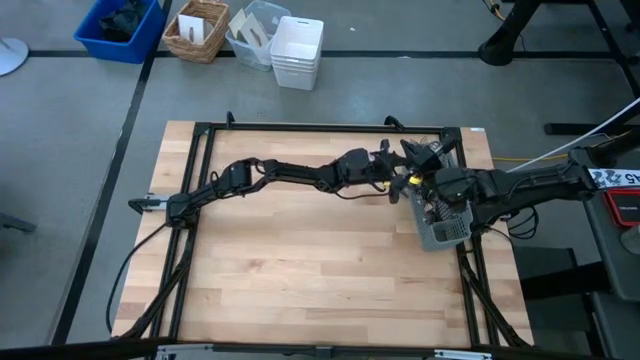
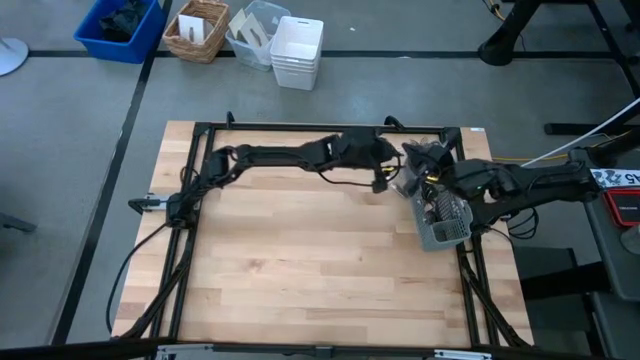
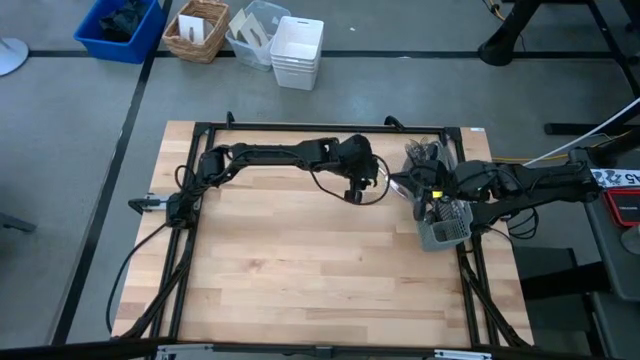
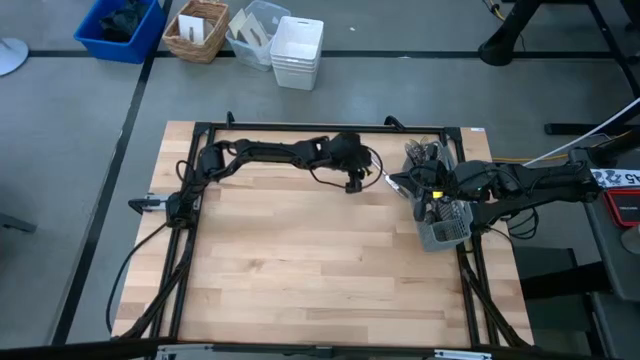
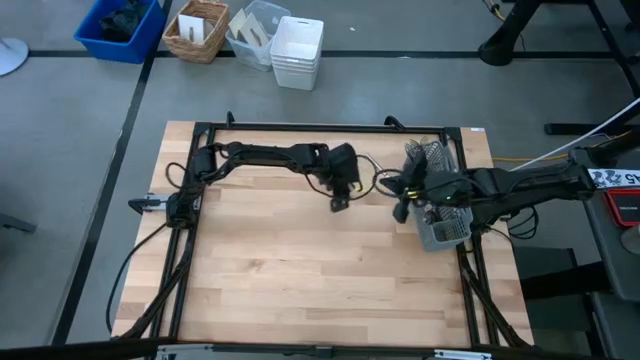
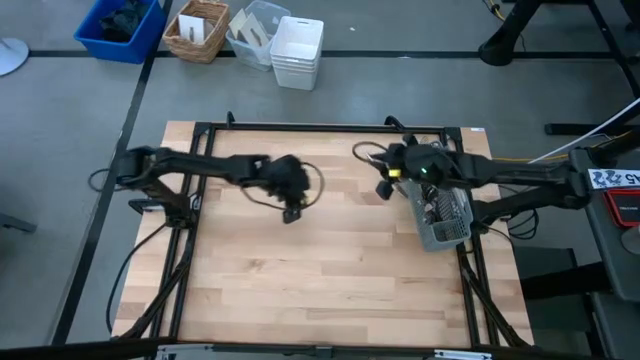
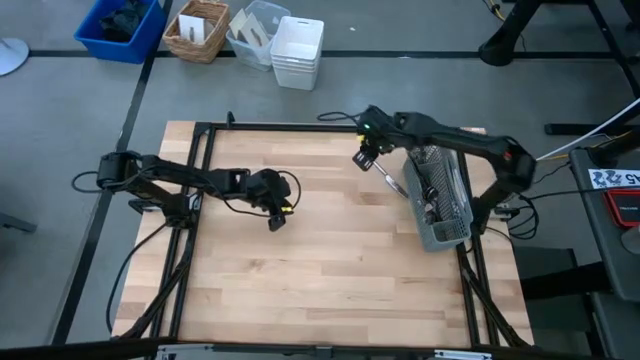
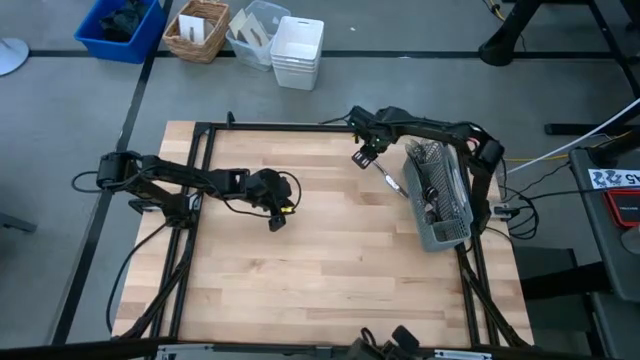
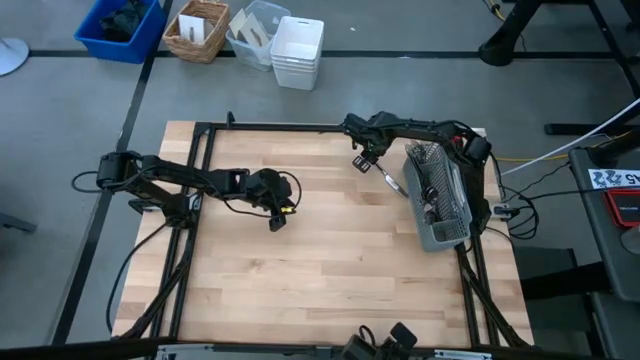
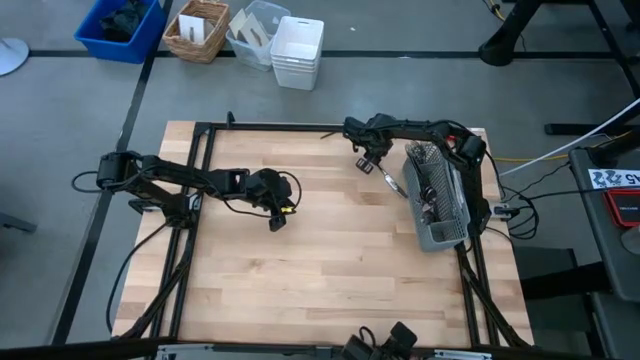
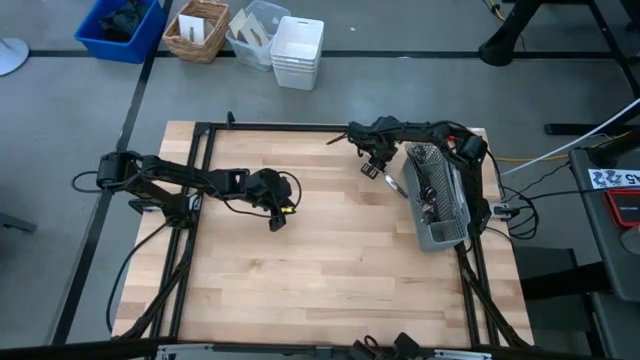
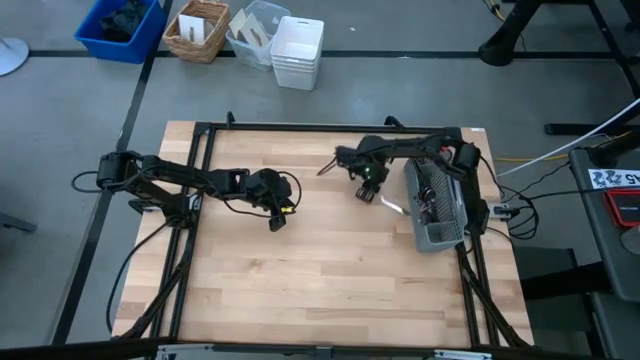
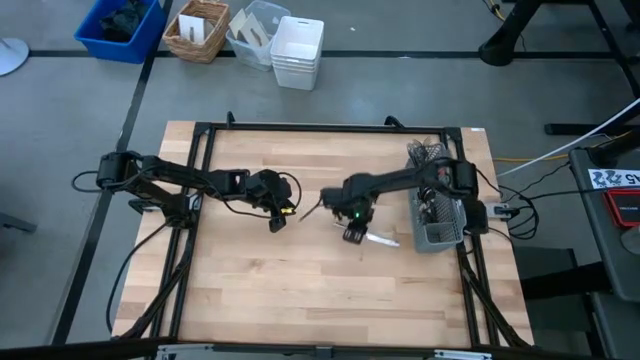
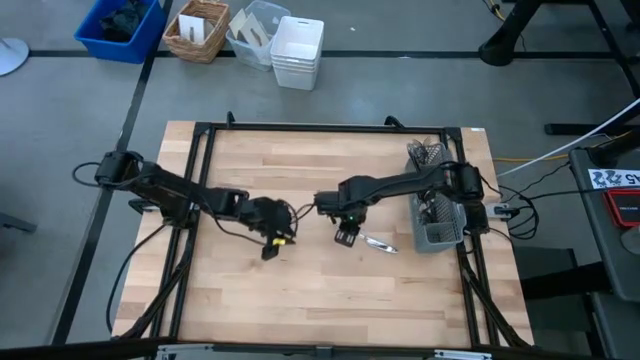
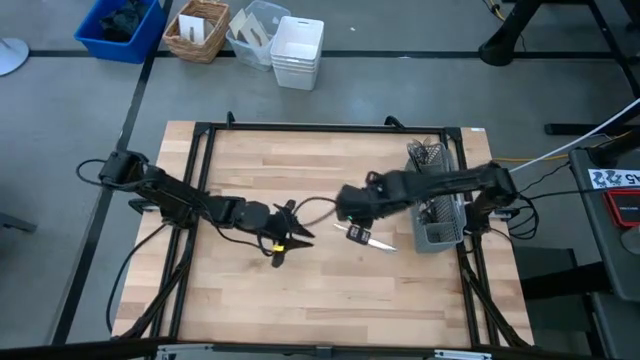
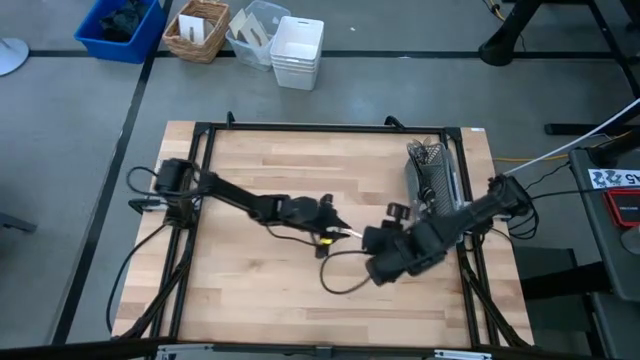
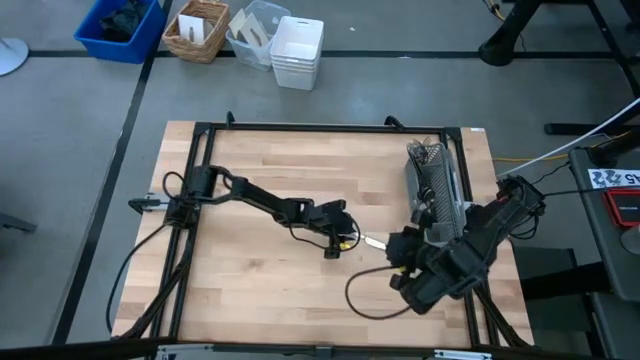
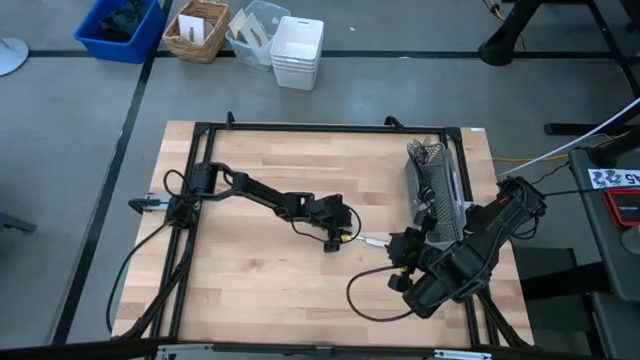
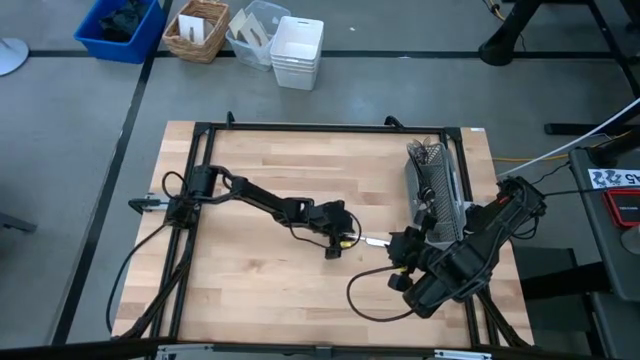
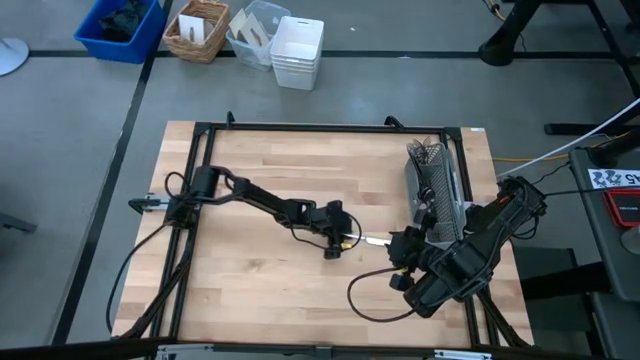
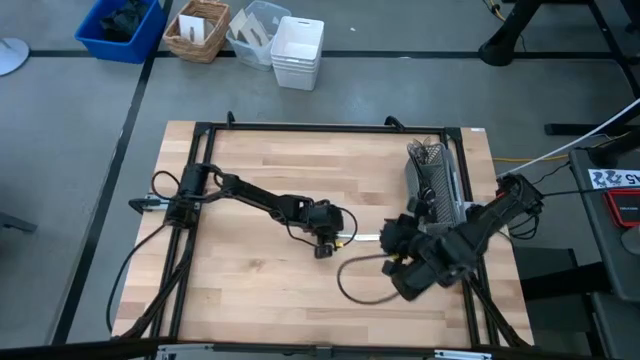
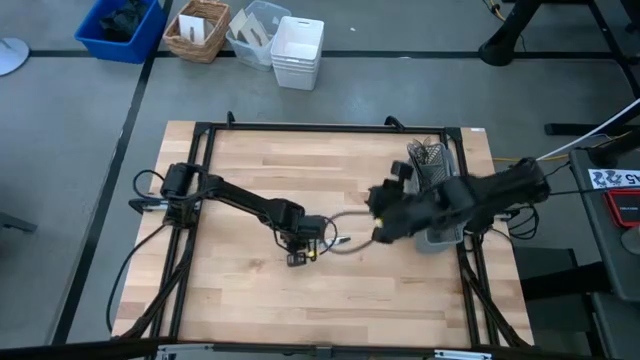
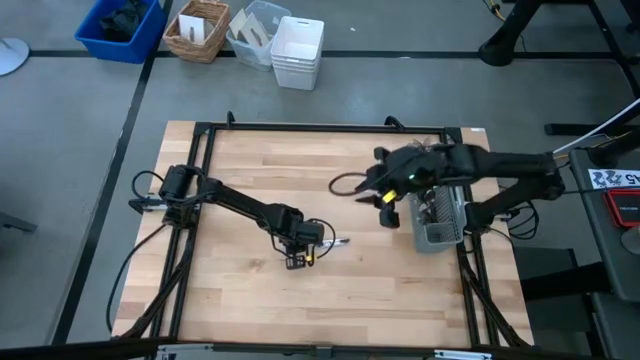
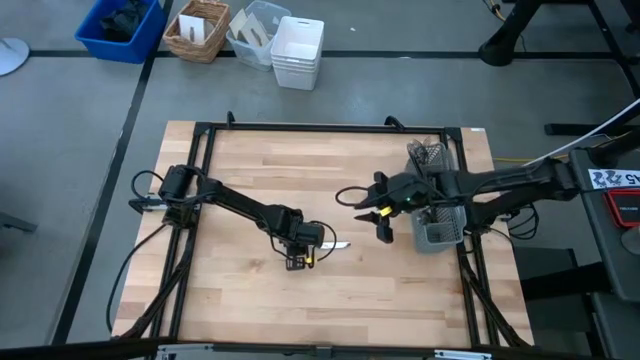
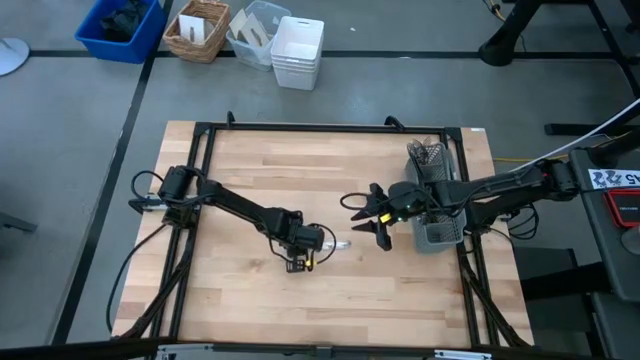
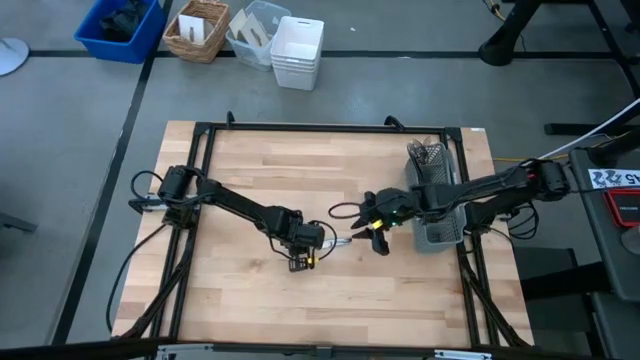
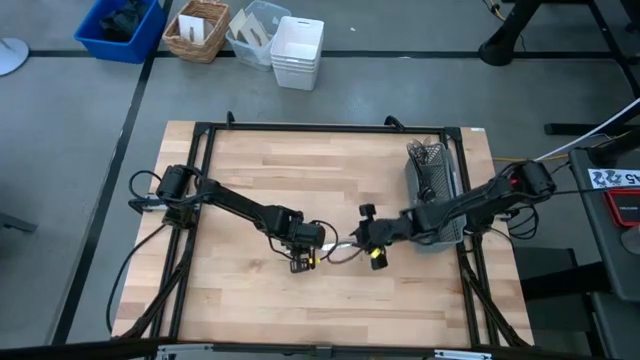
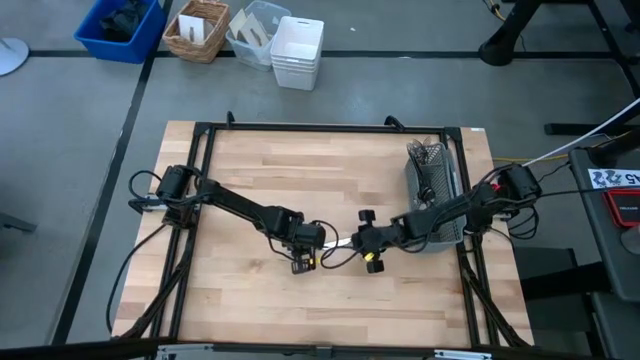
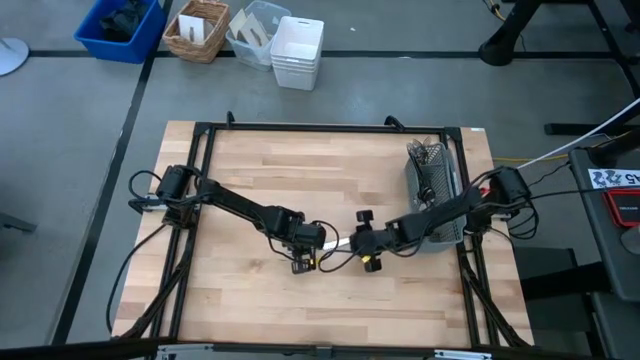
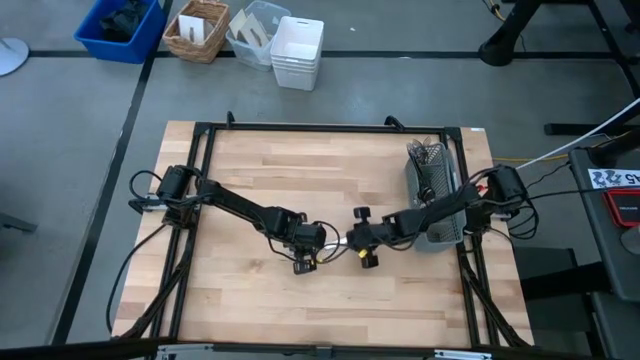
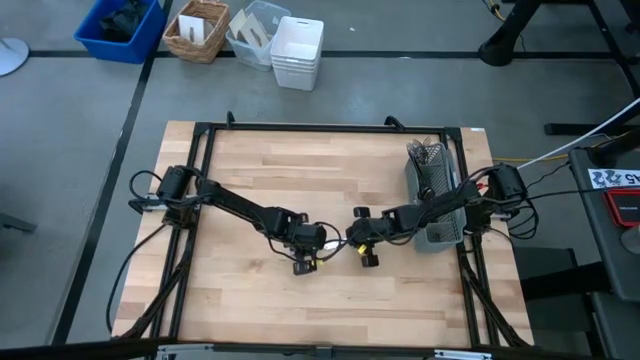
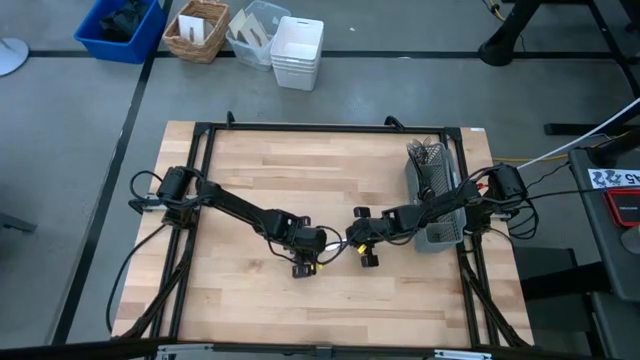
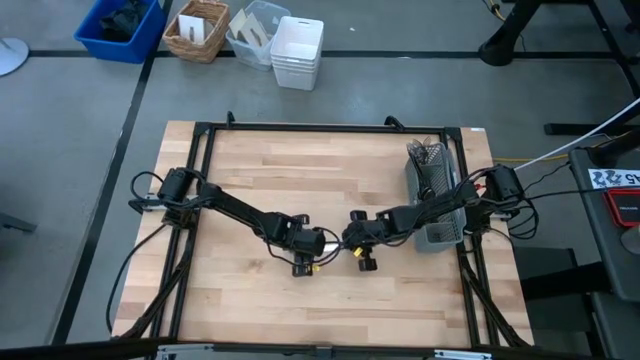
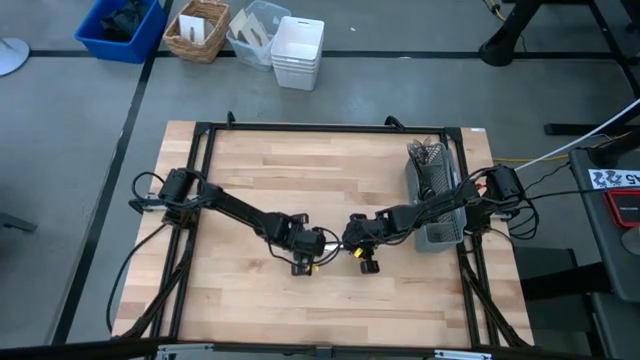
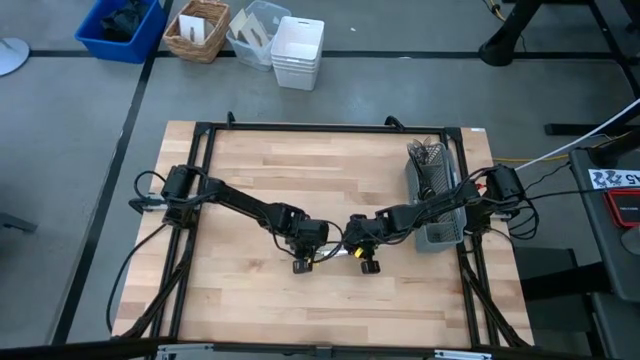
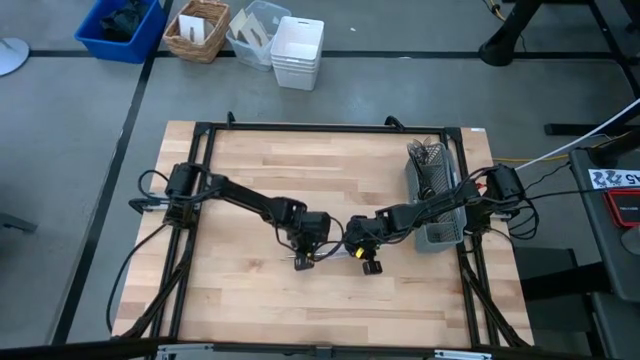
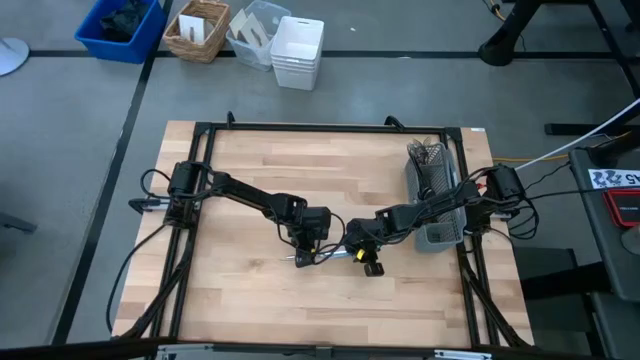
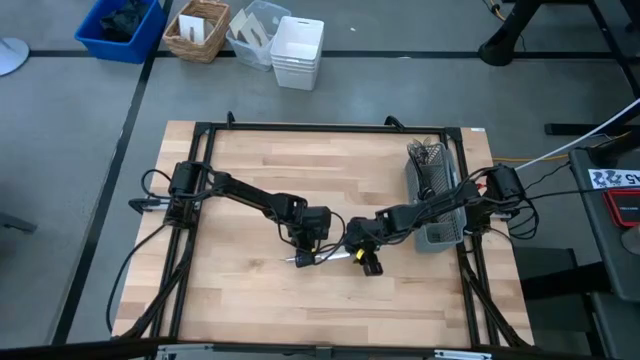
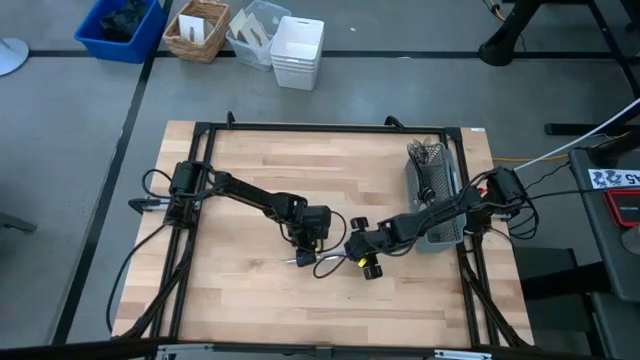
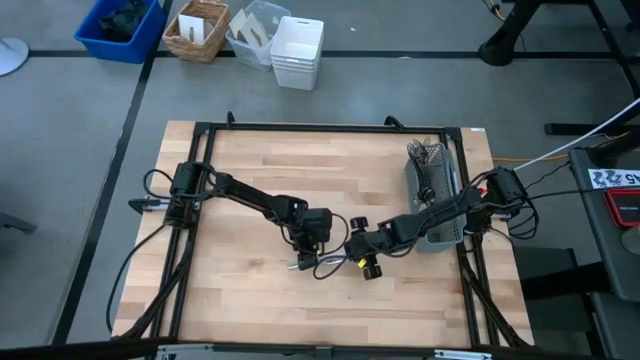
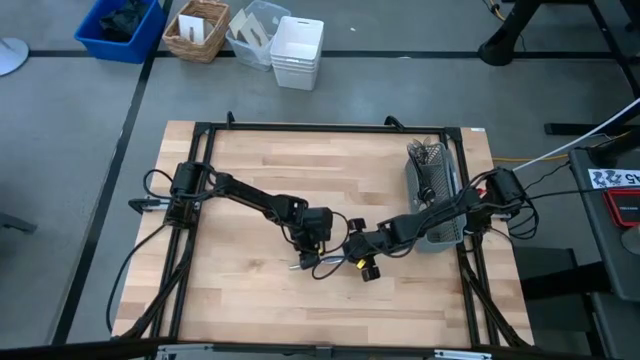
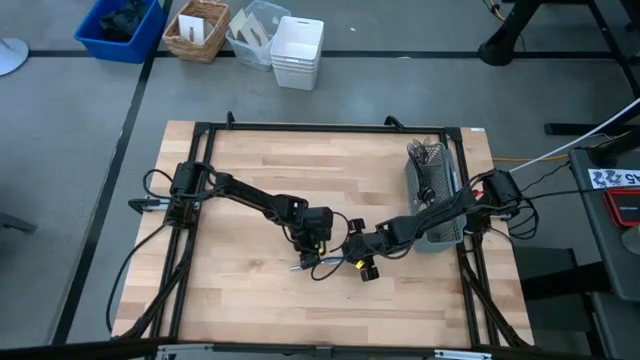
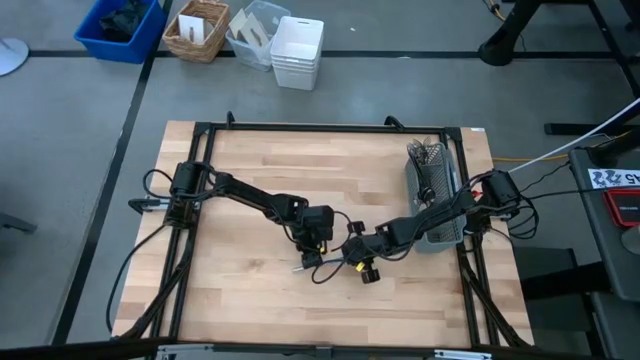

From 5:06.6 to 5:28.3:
Task: Sort silverware
Put the knife into the middle section of the utensil holder
